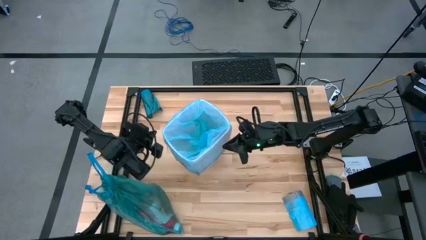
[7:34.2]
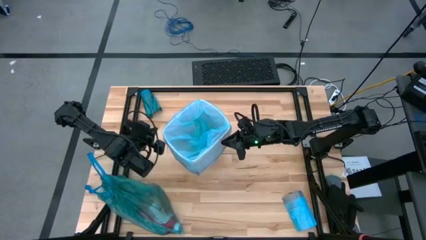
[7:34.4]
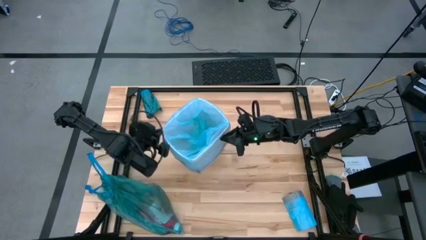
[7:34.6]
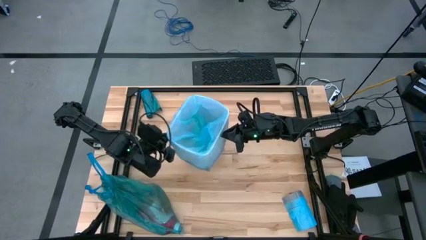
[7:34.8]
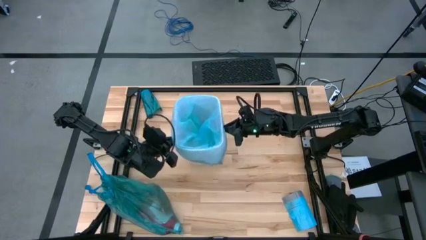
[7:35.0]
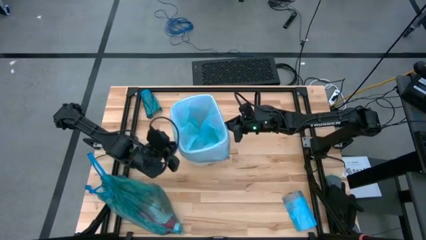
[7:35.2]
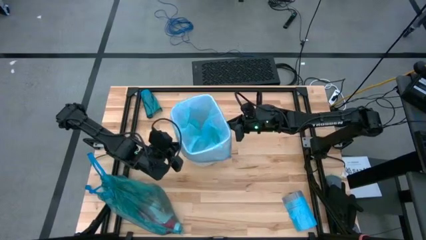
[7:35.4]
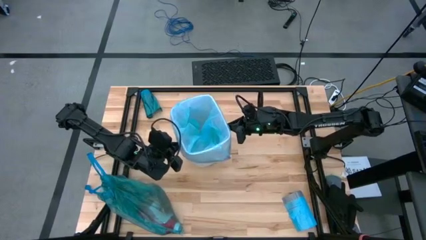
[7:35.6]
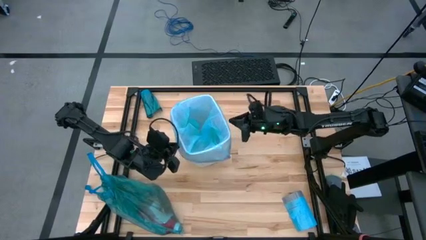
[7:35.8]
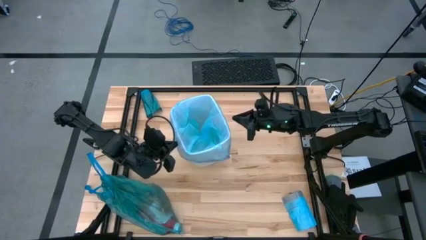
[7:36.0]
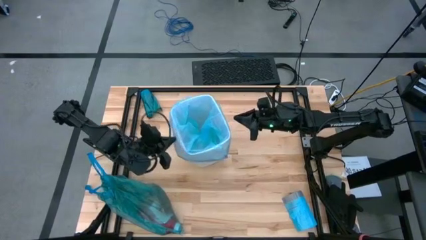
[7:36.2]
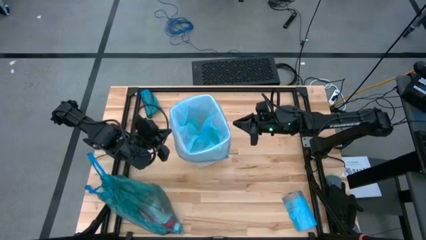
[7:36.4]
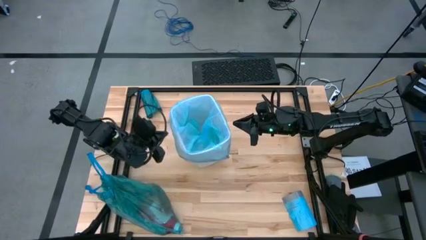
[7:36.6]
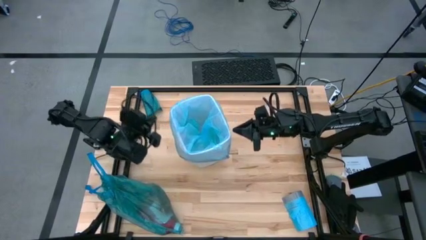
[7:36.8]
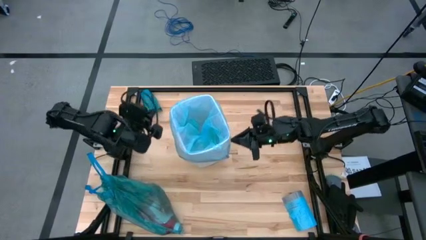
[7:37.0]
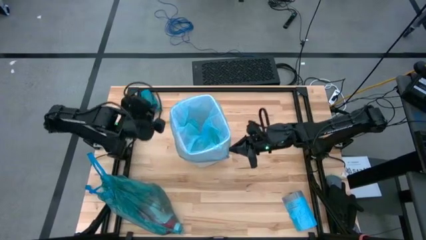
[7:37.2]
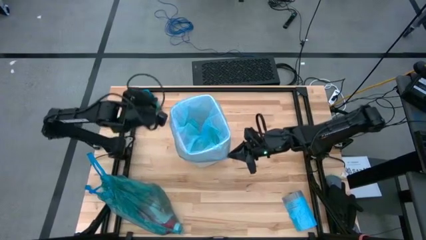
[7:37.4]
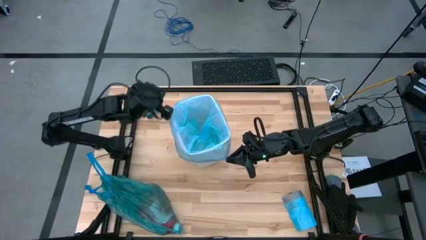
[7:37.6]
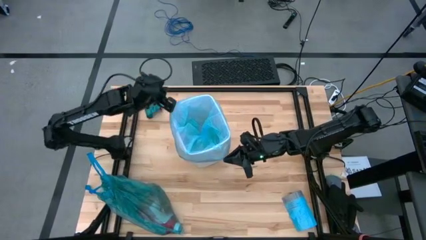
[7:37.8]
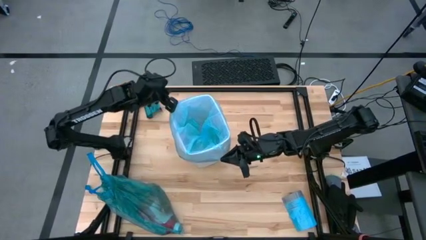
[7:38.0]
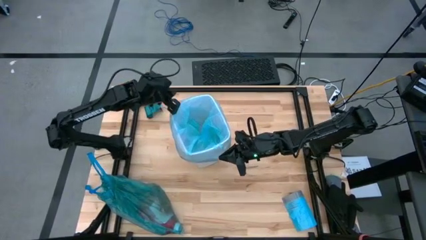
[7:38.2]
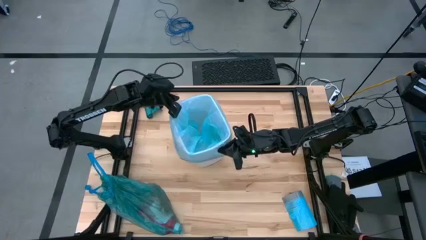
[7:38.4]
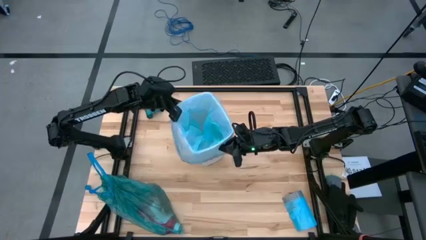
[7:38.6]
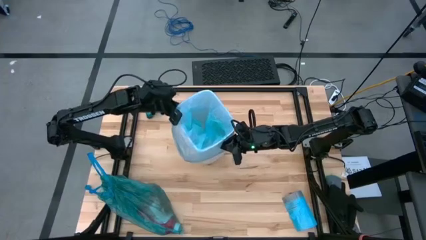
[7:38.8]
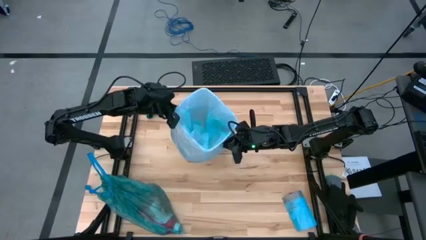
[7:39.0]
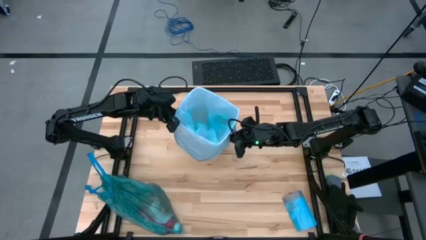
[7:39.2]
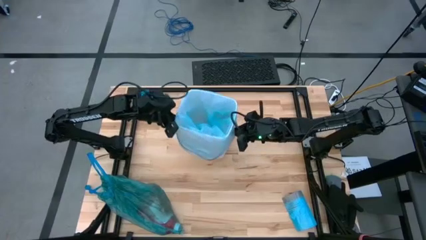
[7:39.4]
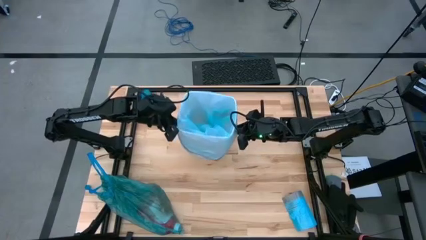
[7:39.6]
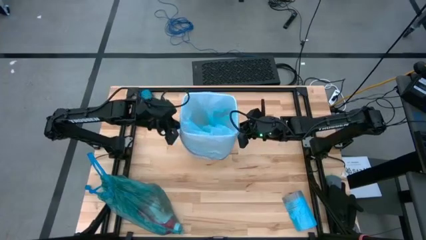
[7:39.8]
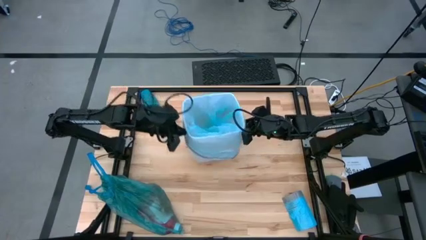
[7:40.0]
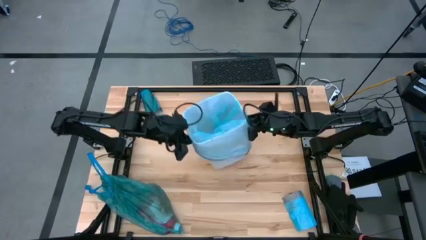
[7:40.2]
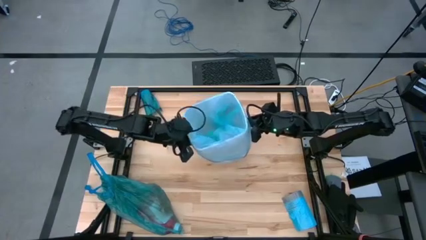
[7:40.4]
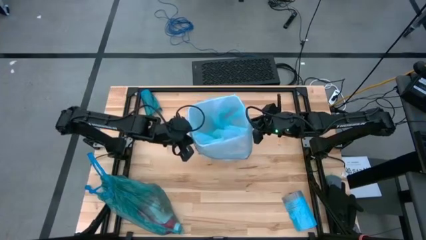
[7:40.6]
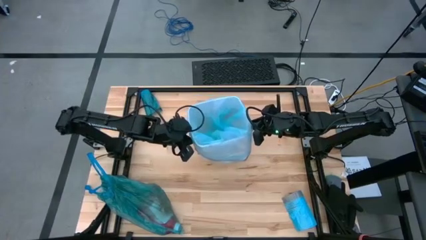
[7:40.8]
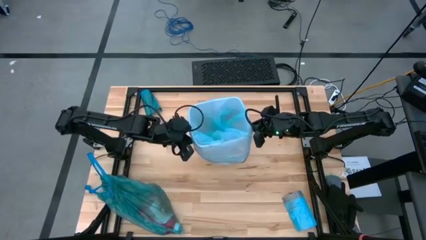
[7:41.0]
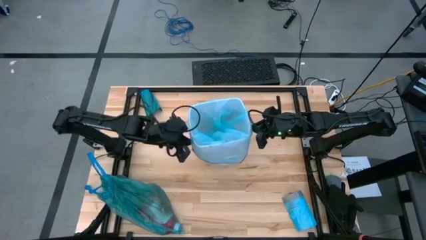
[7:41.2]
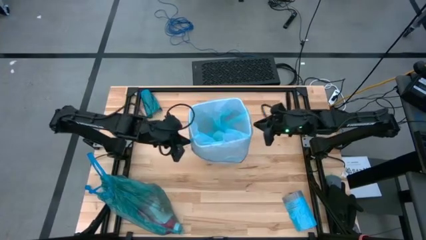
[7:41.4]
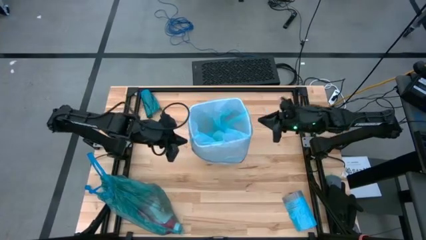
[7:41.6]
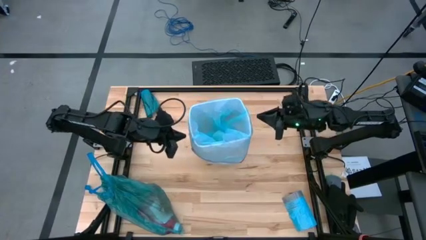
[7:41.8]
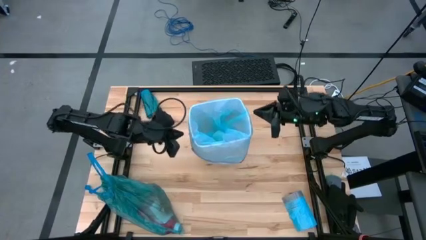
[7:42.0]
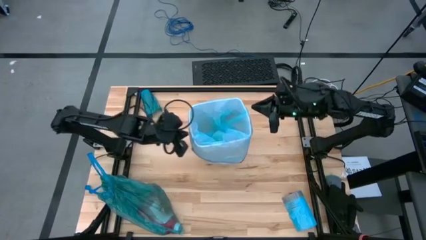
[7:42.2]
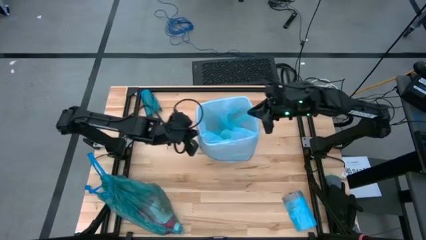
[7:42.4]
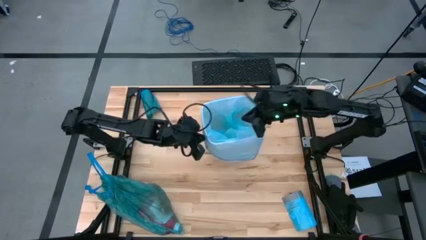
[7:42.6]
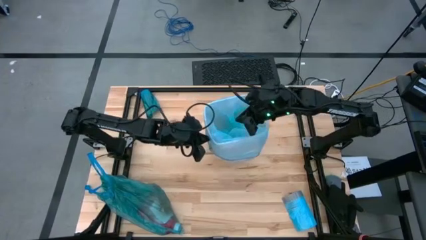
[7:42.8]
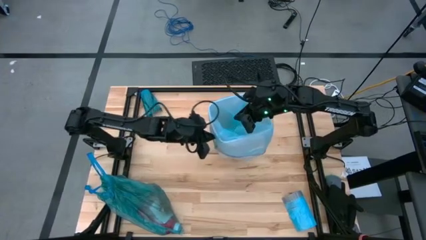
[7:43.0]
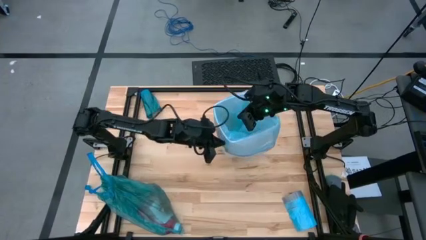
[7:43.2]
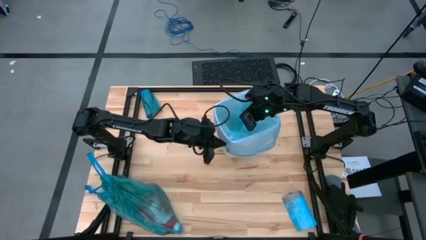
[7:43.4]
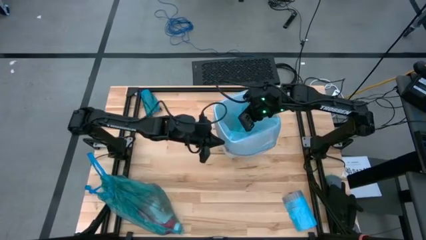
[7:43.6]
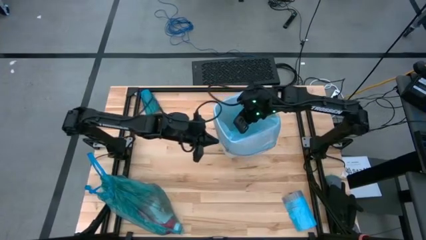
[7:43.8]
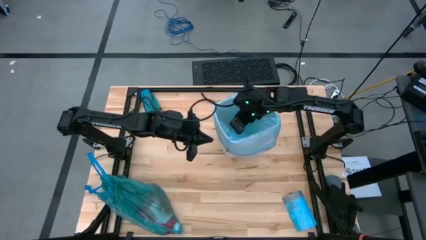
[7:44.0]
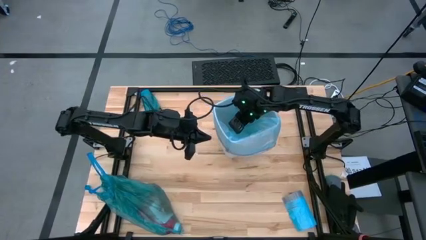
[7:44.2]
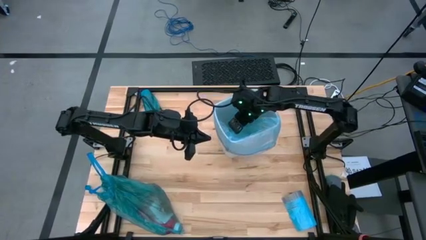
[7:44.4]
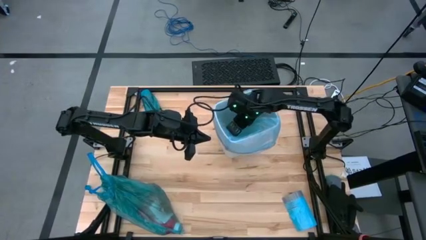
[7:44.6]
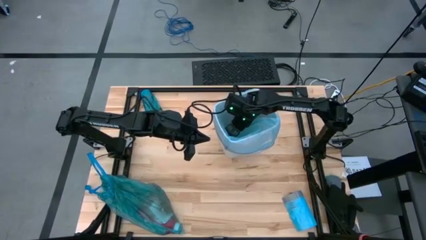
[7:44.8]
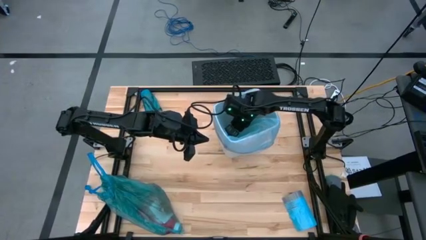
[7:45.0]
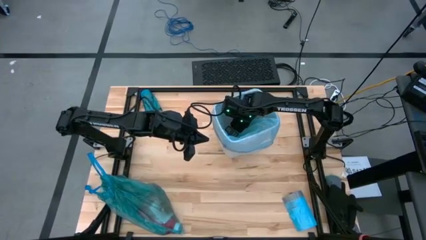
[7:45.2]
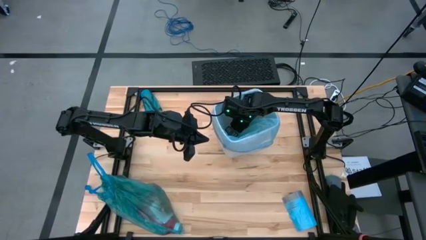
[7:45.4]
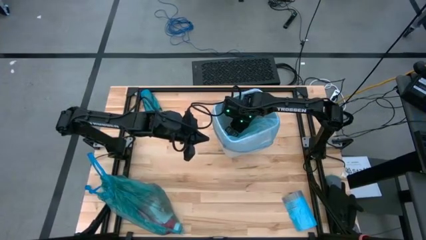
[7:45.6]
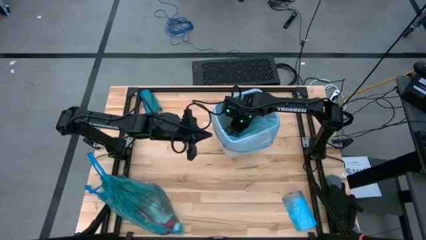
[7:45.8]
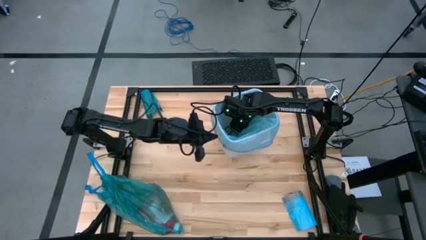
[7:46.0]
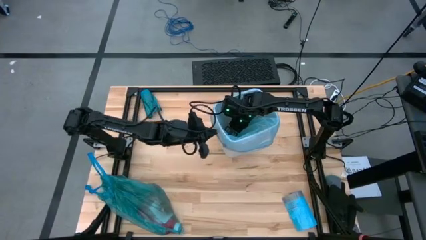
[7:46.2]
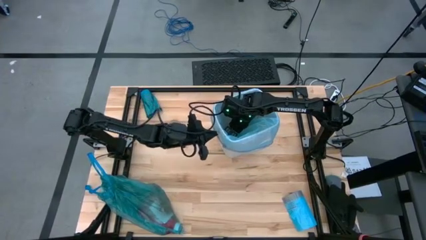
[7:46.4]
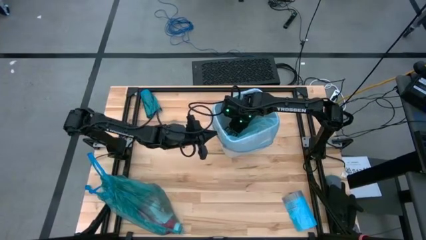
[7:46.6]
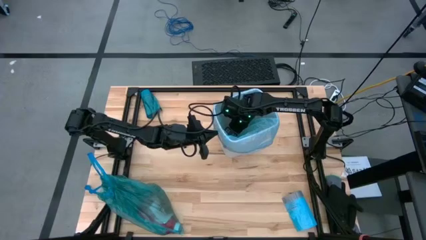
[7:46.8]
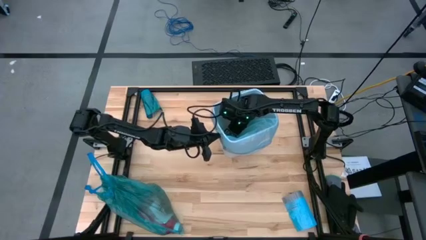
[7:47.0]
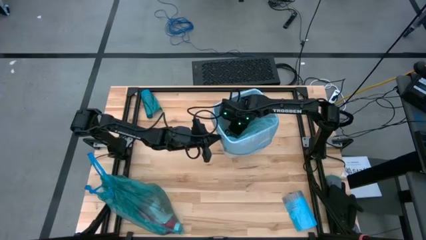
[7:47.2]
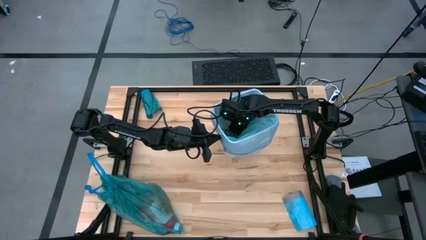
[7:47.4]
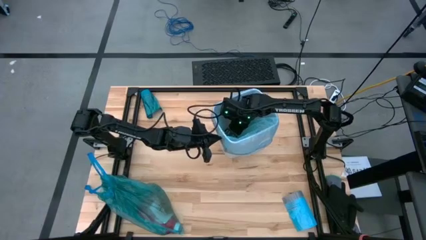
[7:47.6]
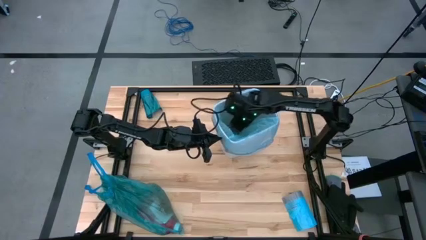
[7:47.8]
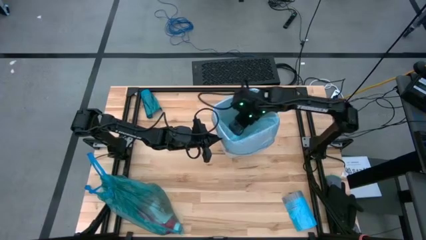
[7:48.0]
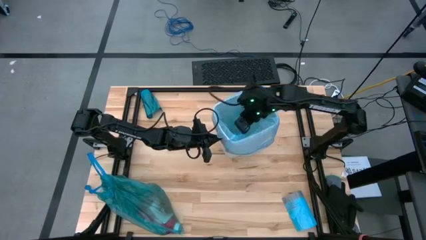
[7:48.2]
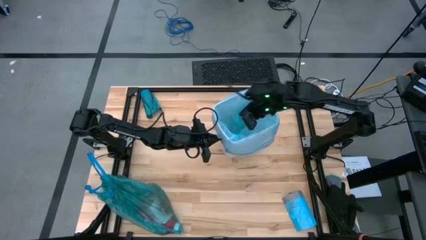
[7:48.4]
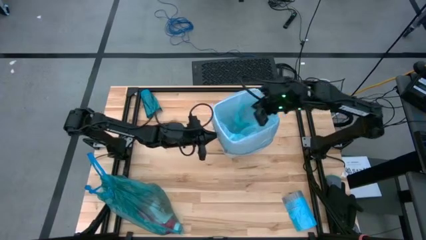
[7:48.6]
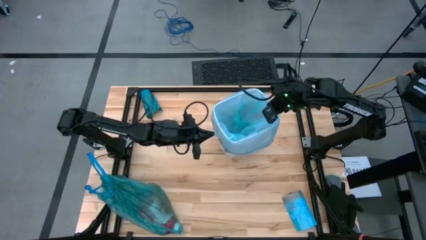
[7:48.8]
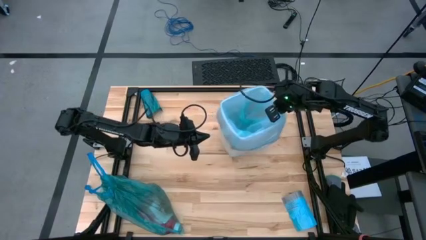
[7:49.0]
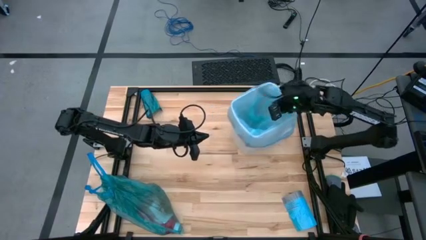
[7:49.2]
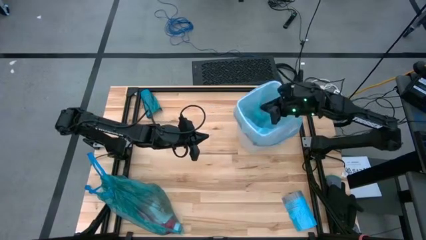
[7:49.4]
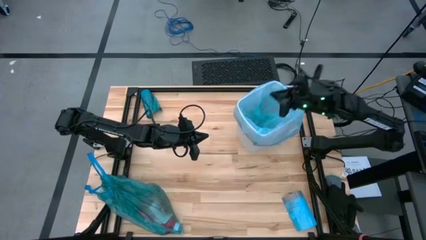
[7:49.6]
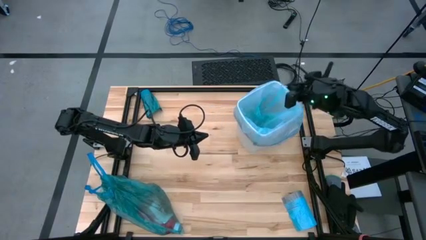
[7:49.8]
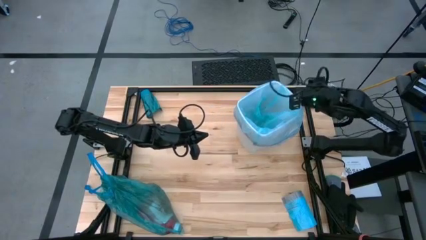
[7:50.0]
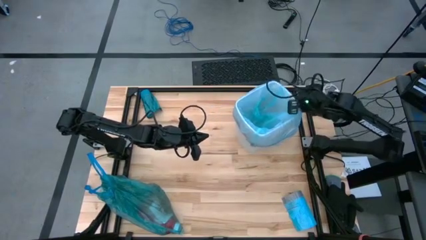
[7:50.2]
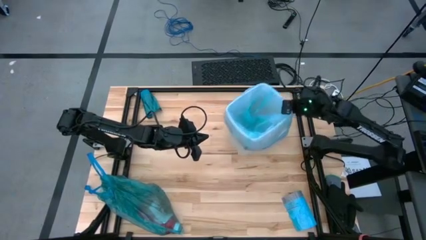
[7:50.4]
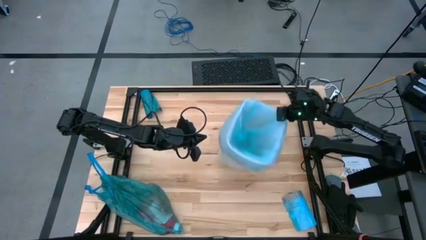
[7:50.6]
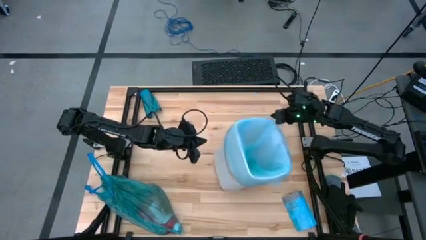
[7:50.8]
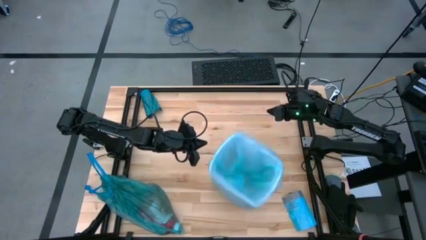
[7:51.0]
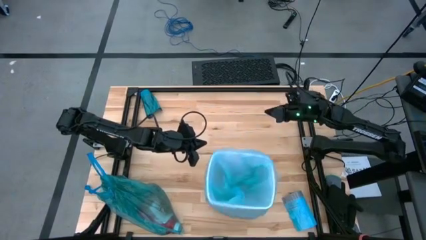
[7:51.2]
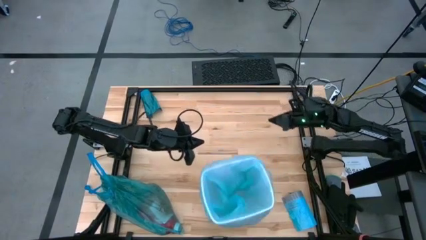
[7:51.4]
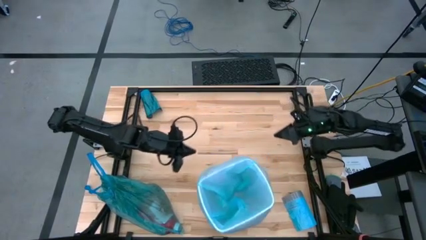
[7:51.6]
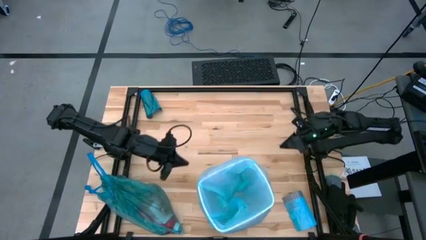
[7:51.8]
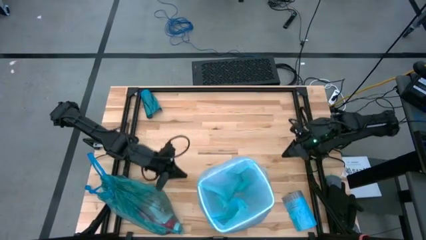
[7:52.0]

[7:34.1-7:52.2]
Task: place trash/remove bag and relplace
Insert the new blue trash bag into the white trash bin
